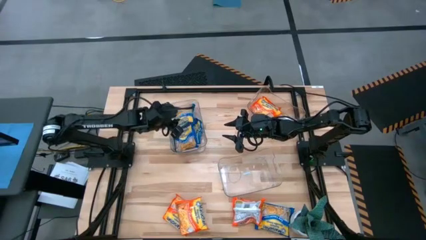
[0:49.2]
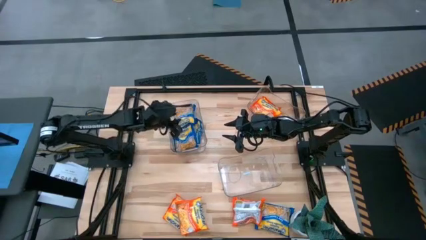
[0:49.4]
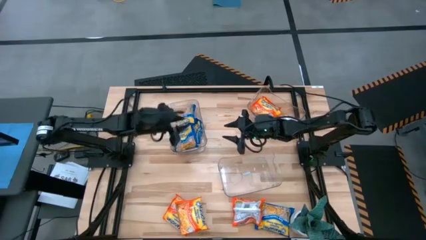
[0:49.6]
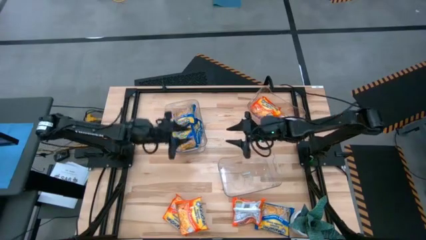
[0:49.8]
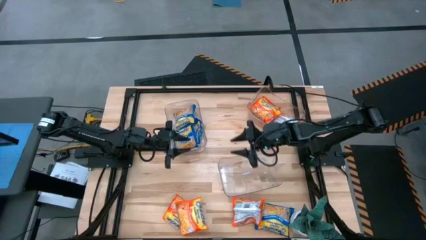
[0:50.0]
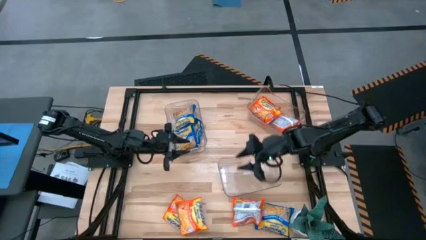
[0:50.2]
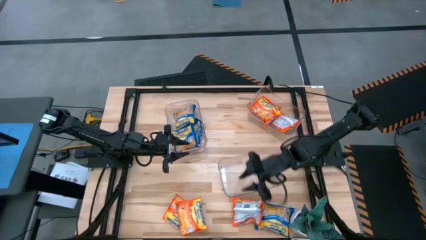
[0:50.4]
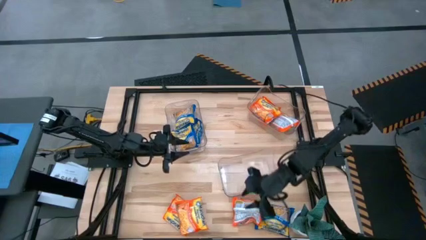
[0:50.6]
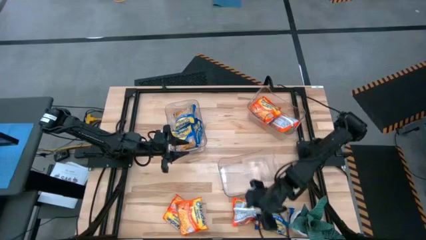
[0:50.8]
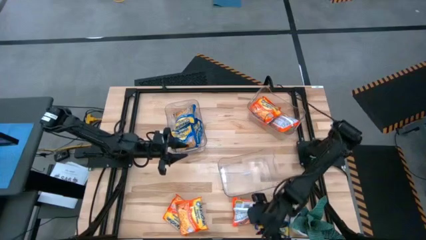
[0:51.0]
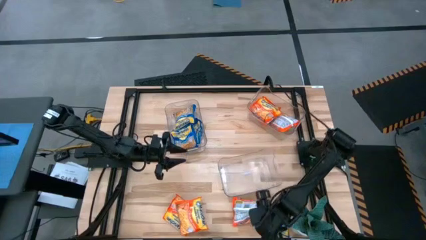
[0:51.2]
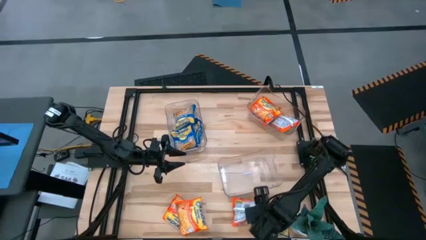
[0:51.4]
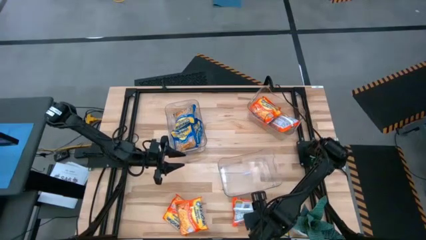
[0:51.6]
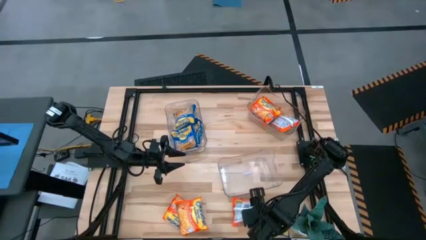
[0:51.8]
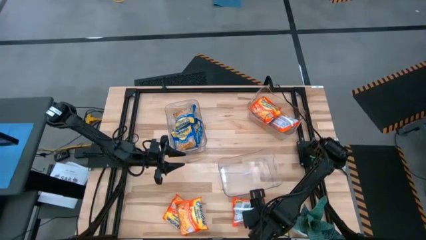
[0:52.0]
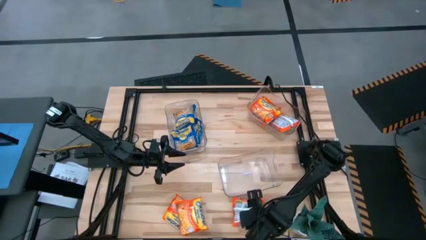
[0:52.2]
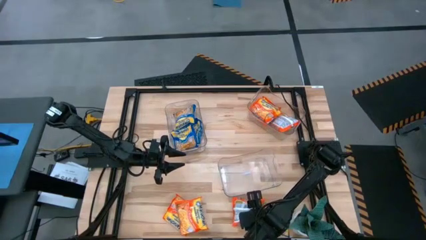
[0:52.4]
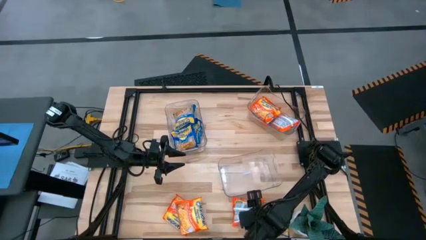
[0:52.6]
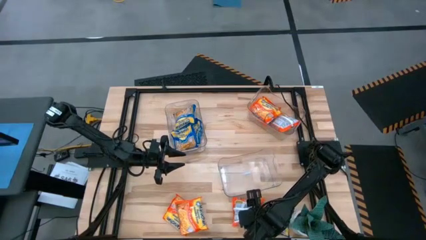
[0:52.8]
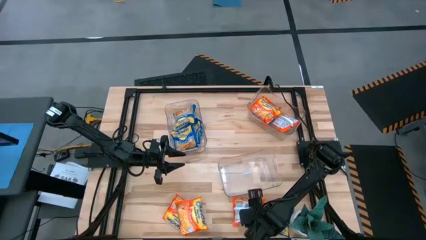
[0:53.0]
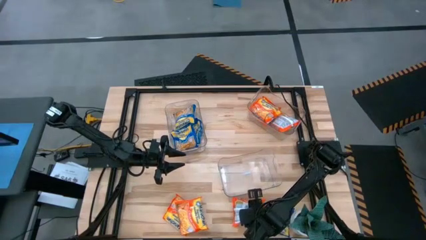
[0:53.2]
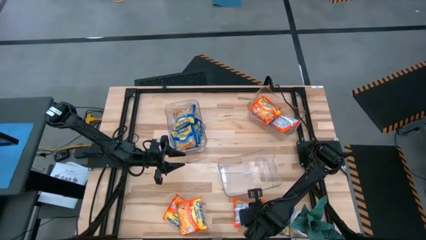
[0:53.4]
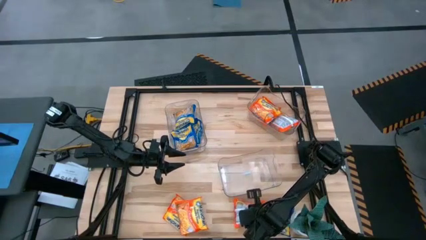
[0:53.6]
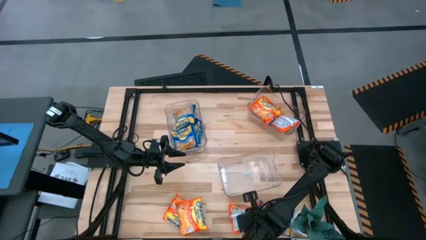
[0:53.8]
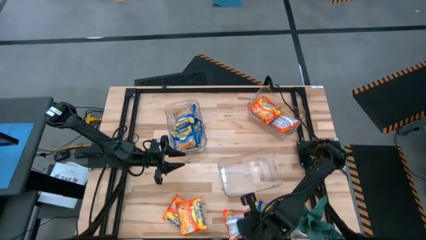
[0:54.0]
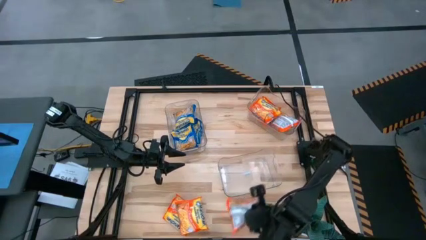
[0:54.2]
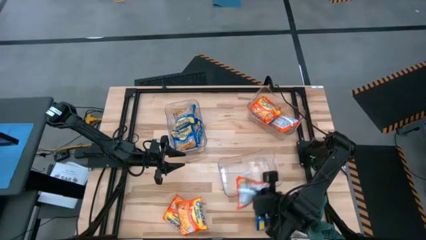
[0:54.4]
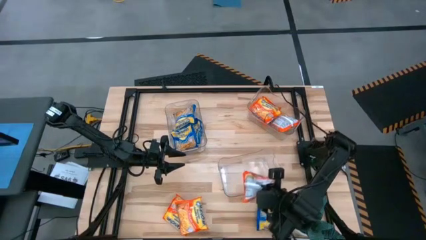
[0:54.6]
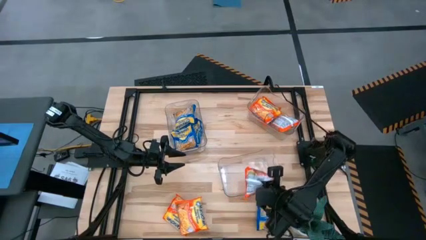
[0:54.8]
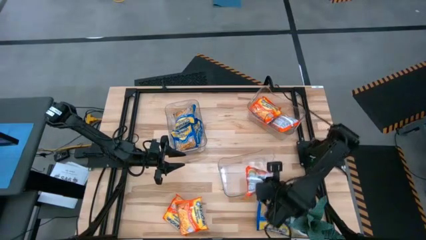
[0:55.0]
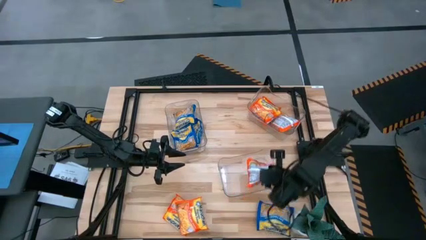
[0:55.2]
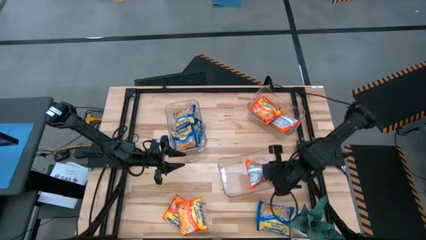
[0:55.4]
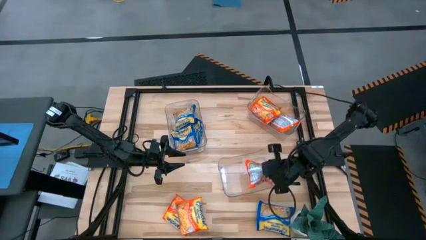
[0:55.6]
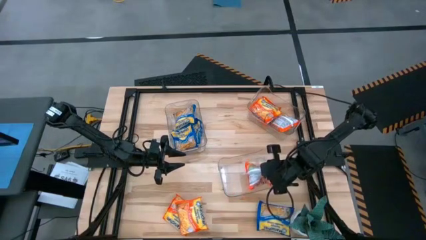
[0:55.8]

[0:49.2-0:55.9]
Task: Sort Maruchan noodles
Put the orange noodle pack into the bottom transparent bin

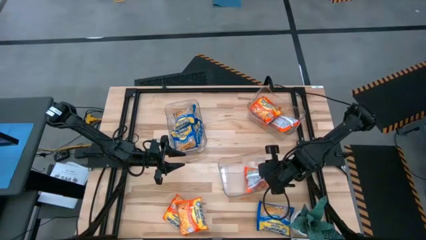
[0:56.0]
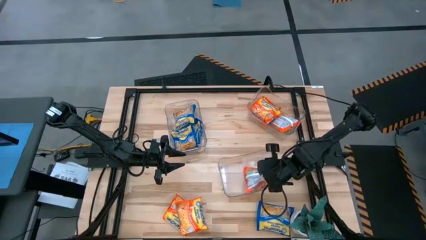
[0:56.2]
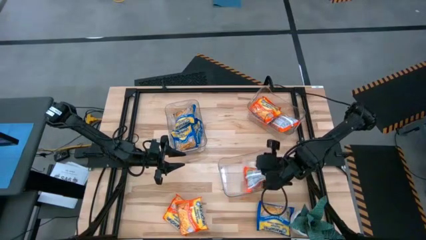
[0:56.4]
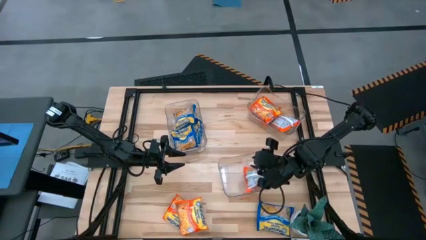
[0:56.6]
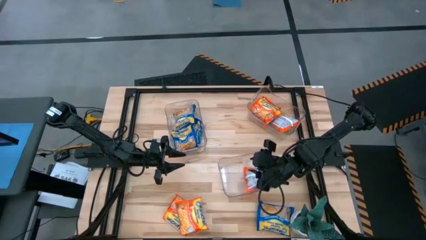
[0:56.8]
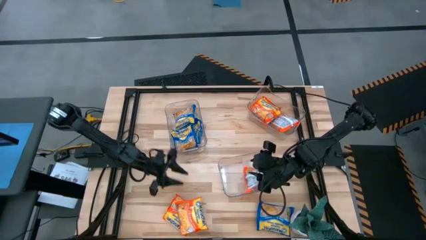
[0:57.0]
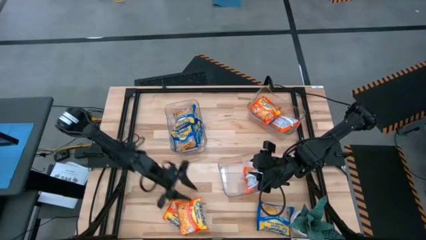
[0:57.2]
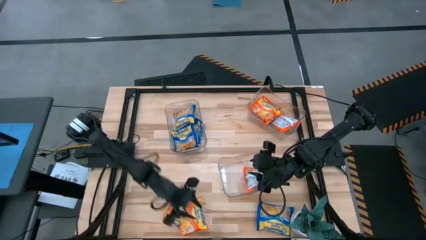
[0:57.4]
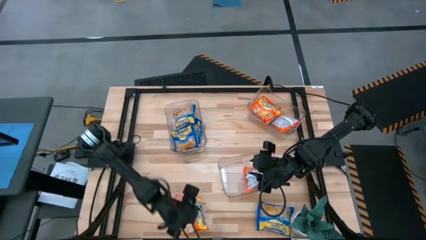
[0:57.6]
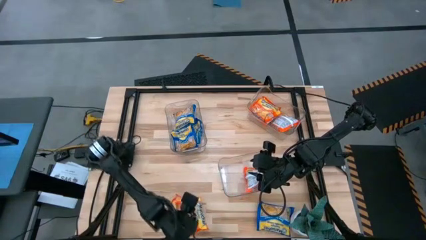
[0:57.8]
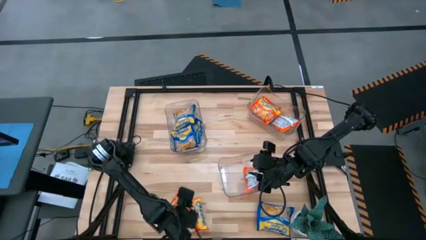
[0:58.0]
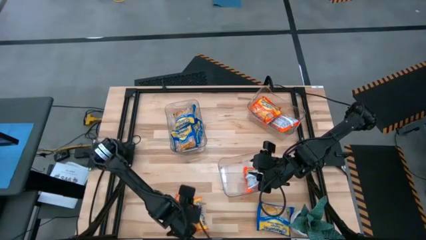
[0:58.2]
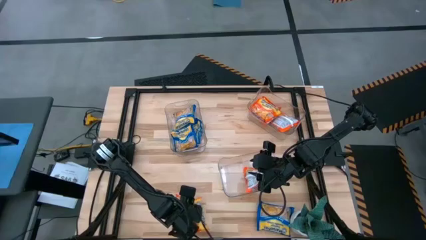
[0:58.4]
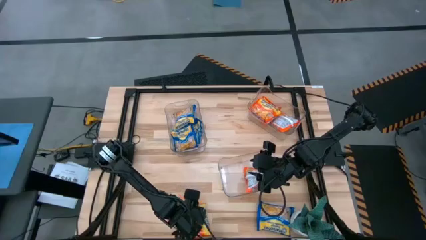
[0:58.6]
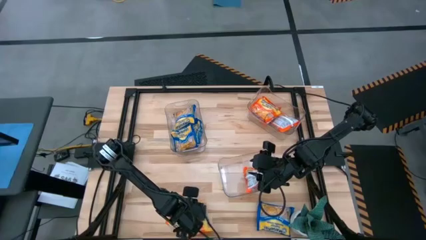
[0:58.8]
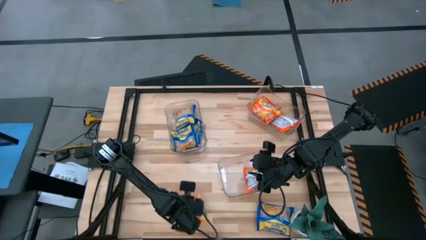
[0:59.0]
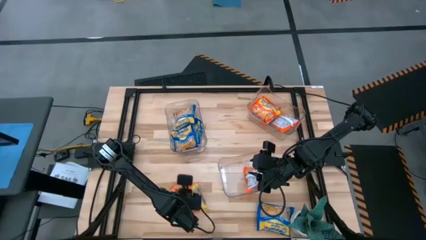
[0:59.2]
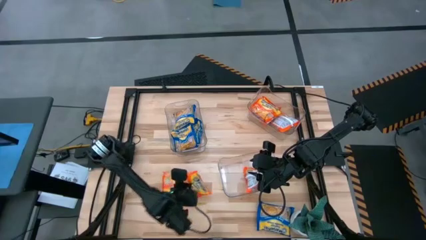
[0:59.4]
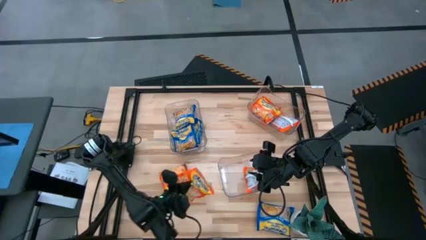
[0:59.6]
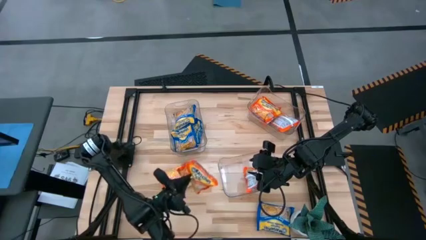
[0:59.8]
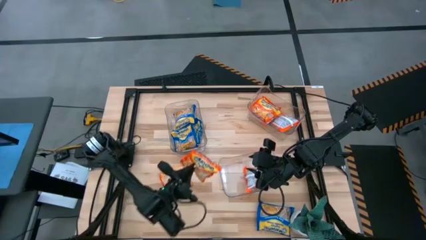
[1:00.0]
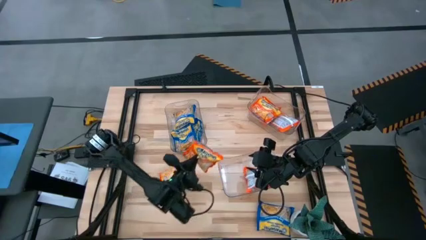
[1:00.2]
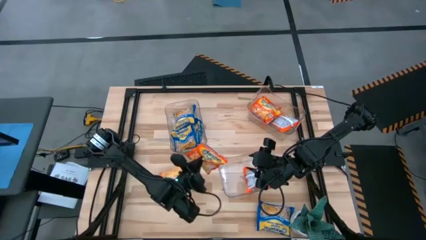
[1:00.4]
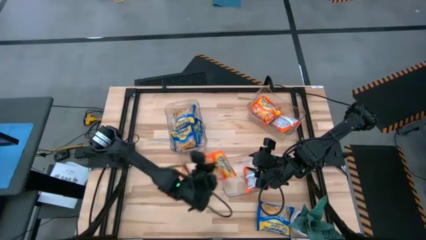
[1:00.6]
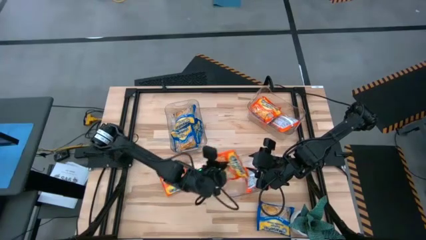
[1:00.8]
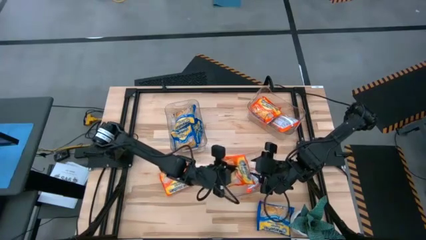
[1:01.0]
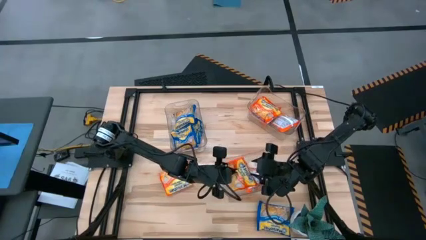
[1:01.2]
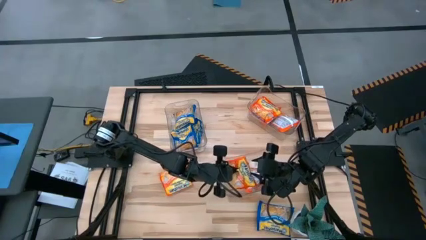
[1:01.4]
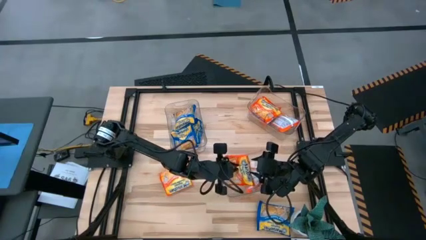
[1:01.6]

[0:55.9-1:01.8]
Put the orange noodle pack into the bottom transparent bin

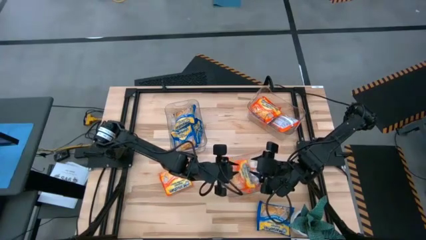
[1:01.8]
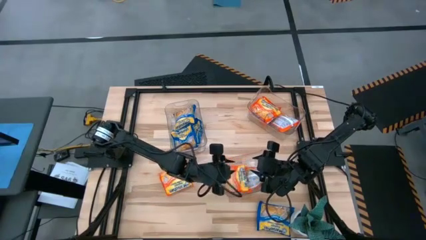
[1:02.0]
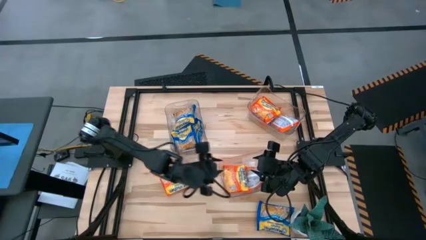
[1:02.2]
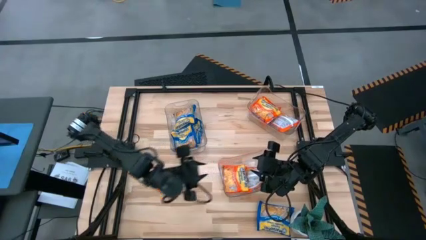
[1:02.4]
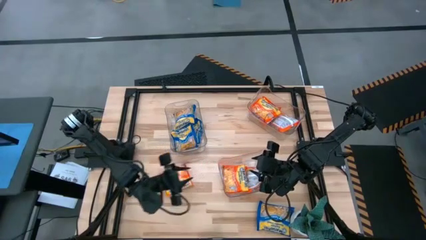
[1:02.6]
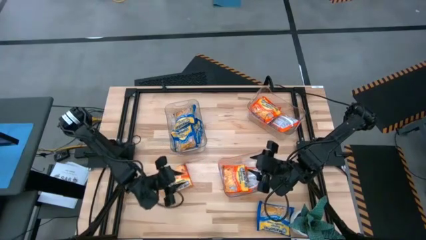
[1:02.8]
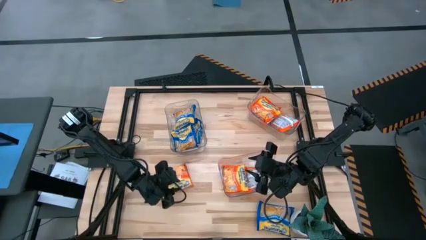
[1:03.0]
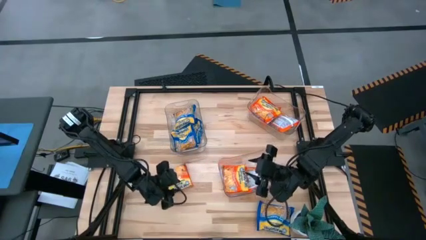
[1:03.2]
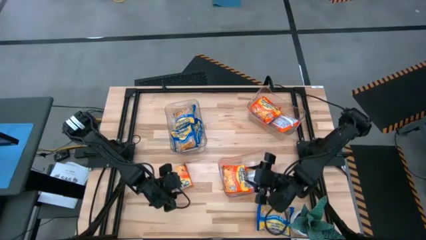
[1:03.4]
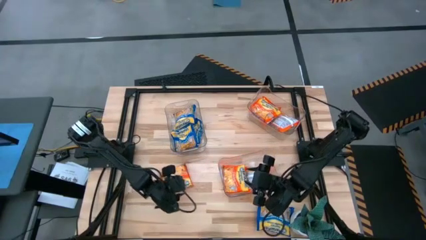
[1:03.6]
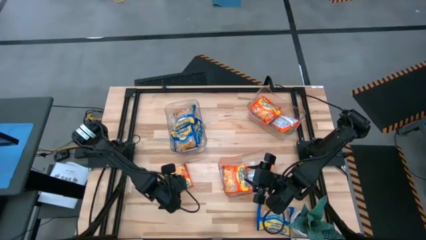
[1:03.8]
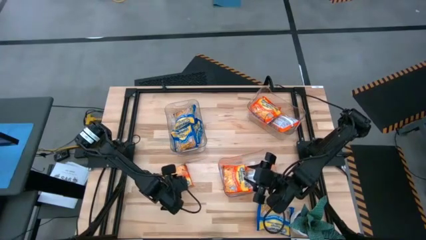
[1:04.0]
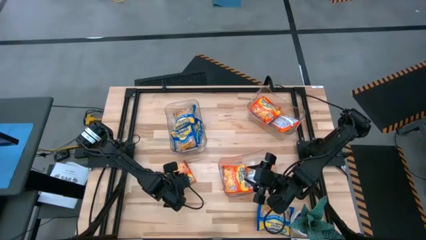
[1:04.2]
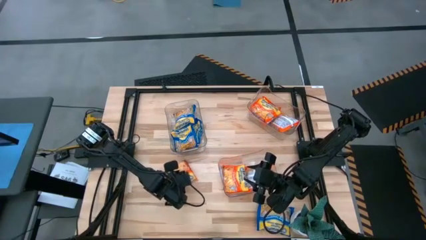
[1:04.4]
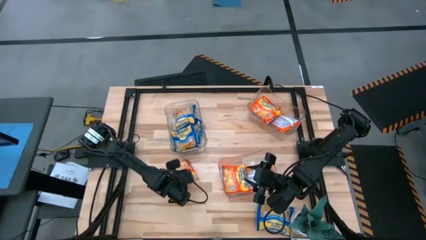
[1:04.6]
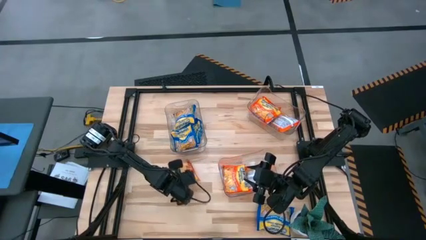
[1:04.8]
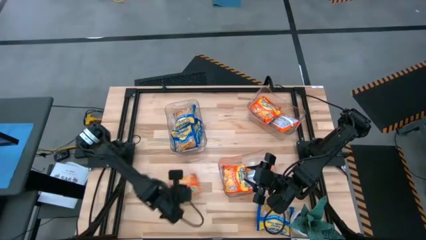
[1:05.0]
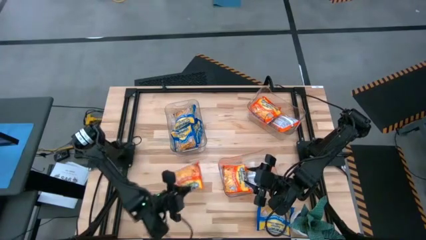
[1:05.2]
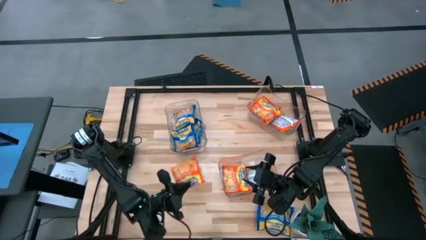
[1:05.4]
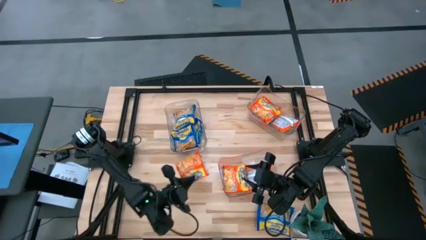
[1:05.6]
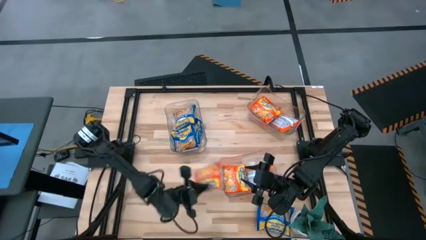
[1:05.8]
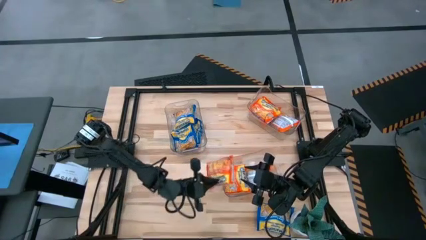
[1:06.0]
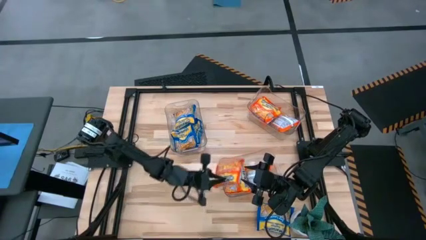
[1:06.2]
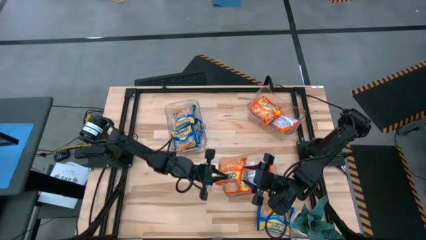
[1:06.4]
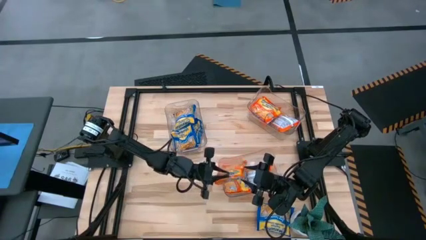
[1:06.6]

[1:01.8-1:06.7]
Put the orange noodle pack into the bottom transparent bin
